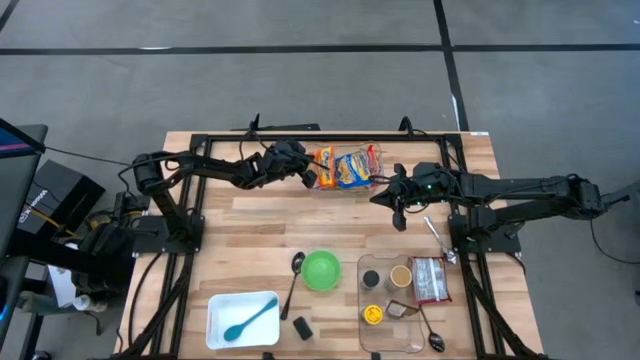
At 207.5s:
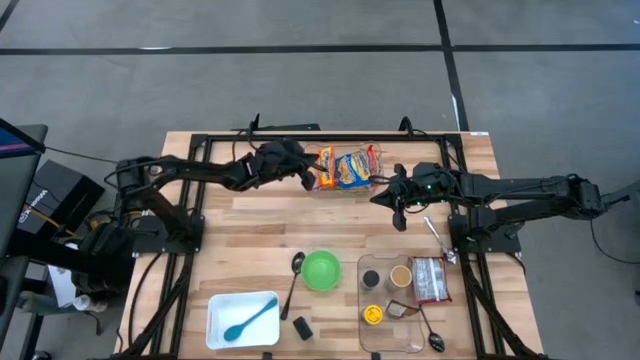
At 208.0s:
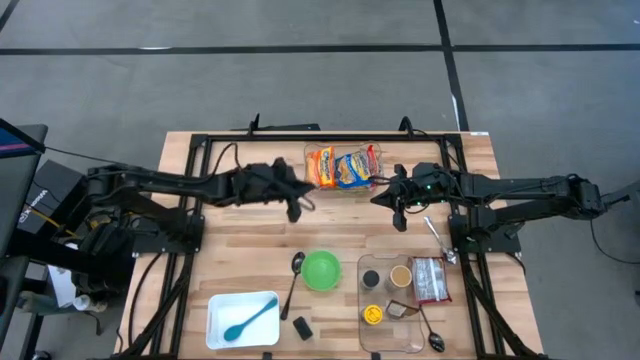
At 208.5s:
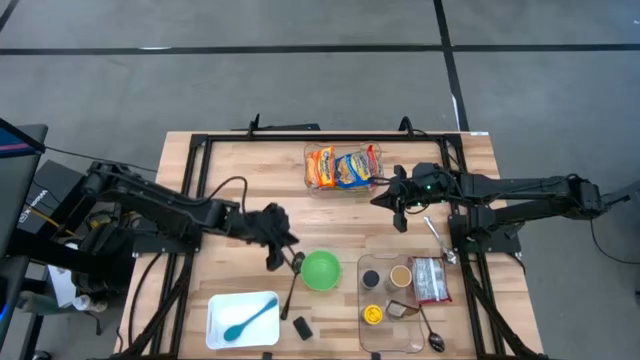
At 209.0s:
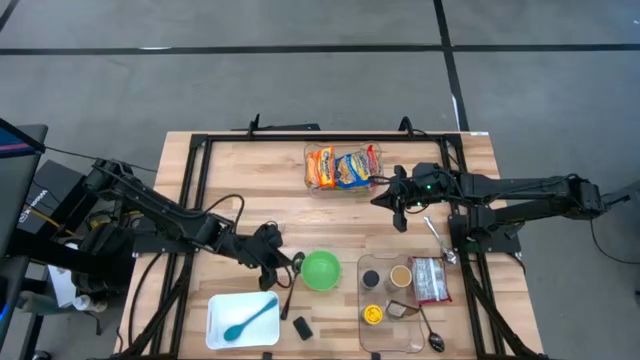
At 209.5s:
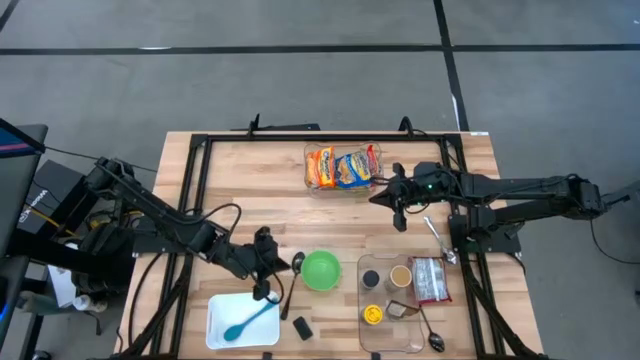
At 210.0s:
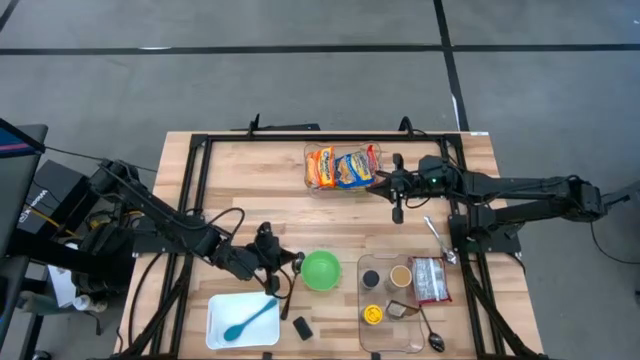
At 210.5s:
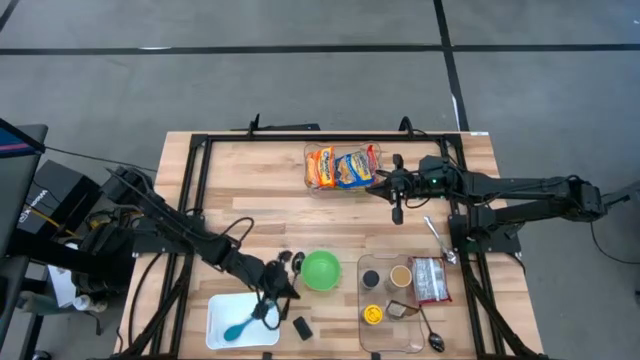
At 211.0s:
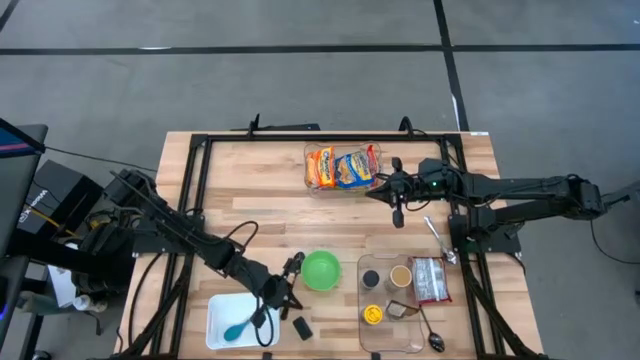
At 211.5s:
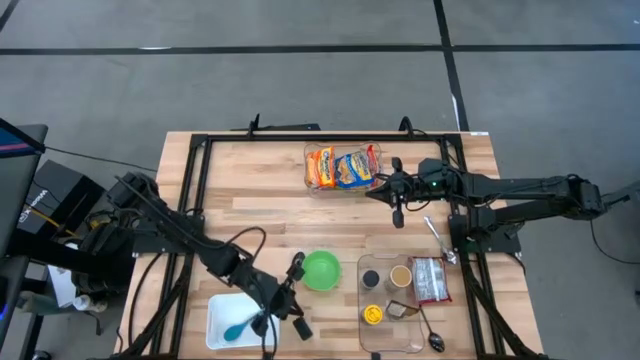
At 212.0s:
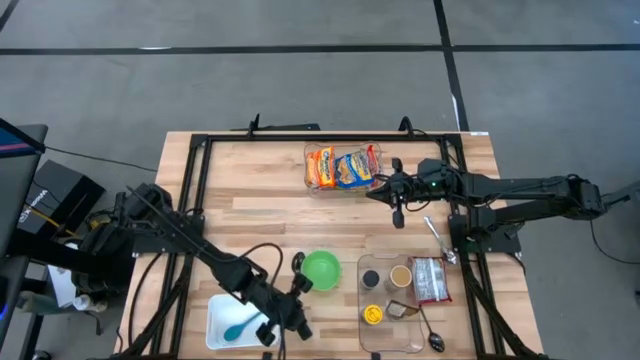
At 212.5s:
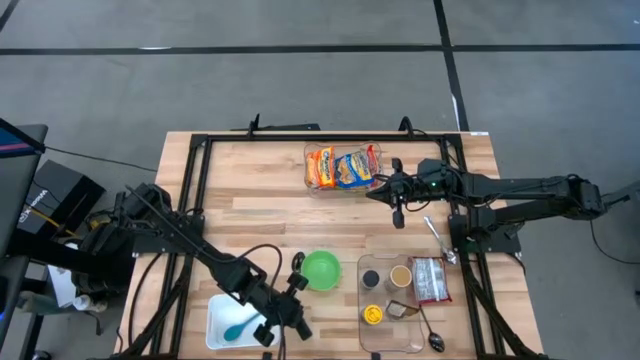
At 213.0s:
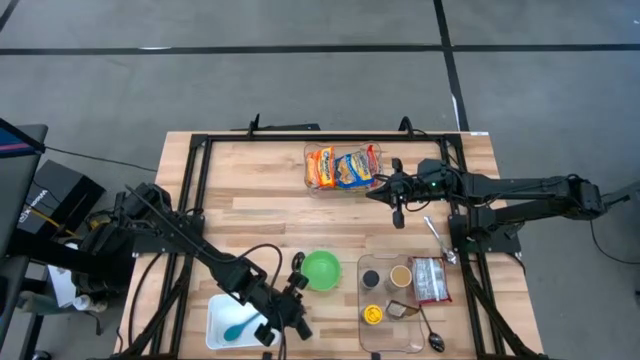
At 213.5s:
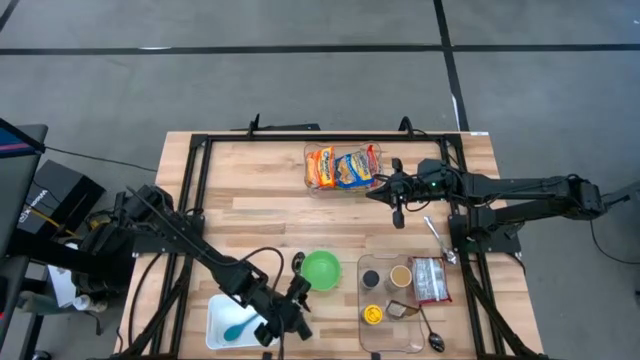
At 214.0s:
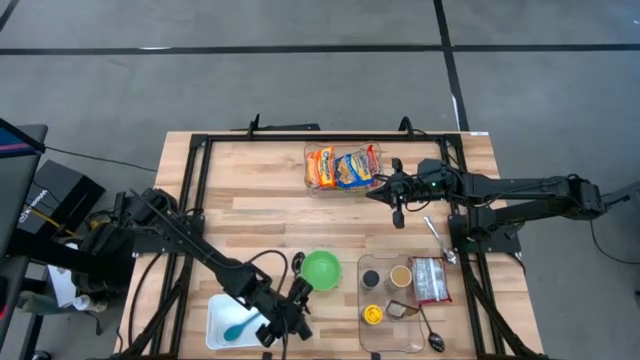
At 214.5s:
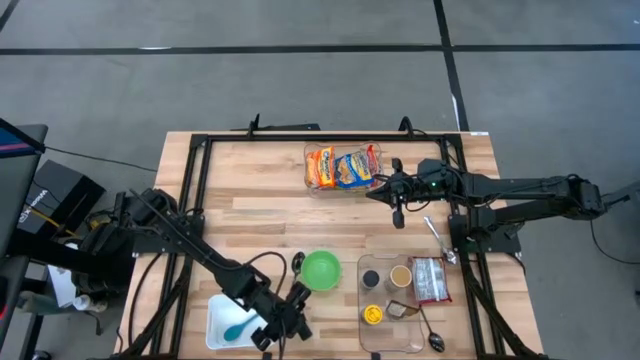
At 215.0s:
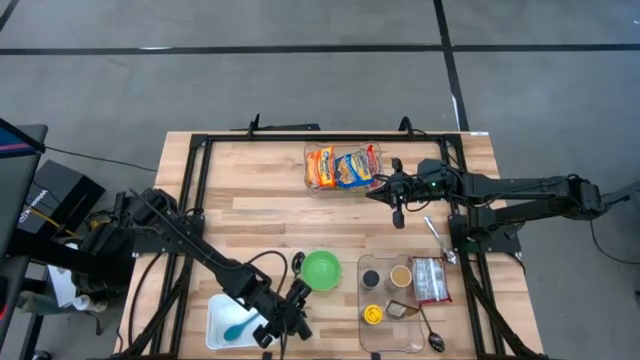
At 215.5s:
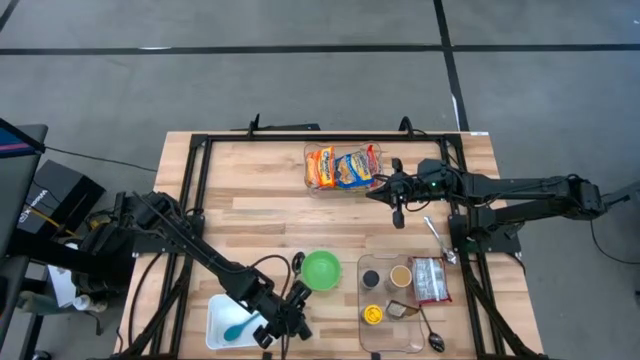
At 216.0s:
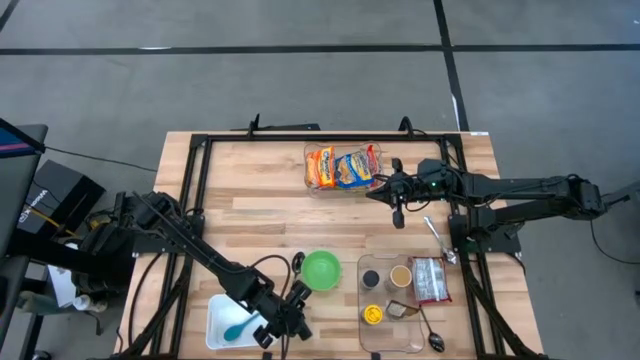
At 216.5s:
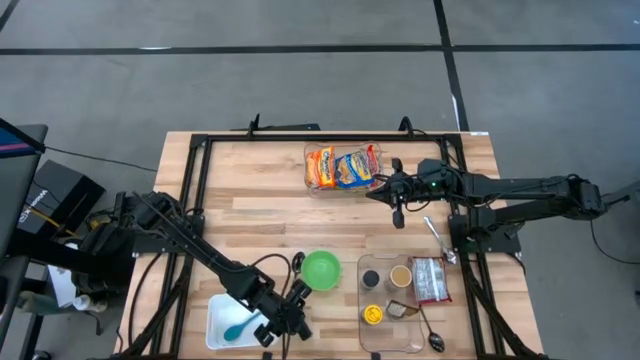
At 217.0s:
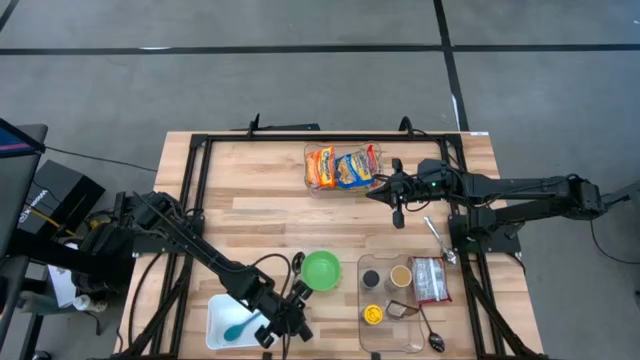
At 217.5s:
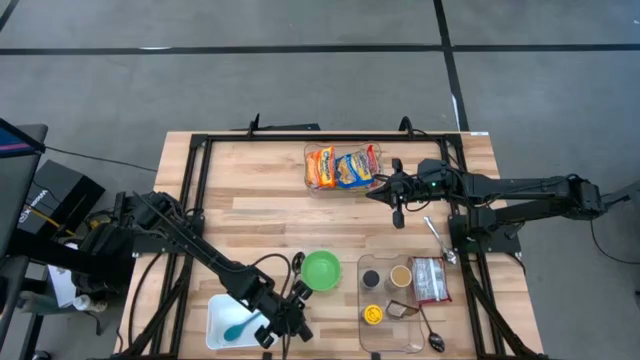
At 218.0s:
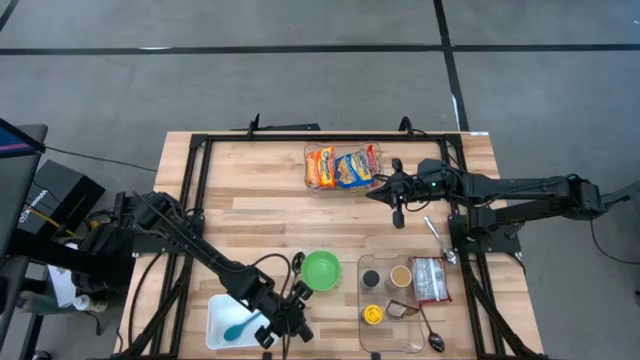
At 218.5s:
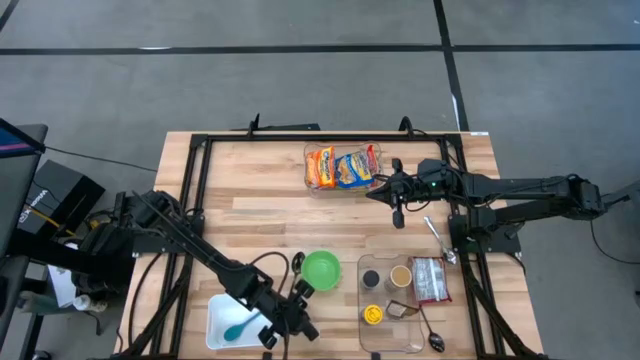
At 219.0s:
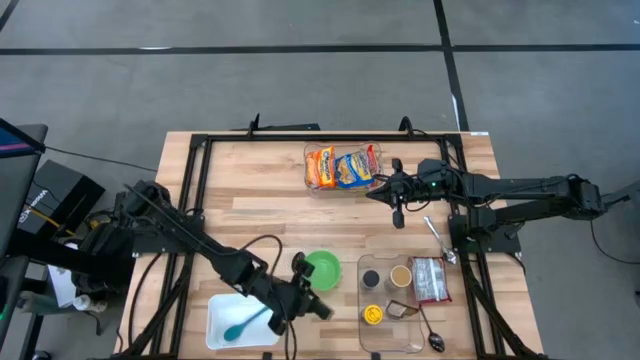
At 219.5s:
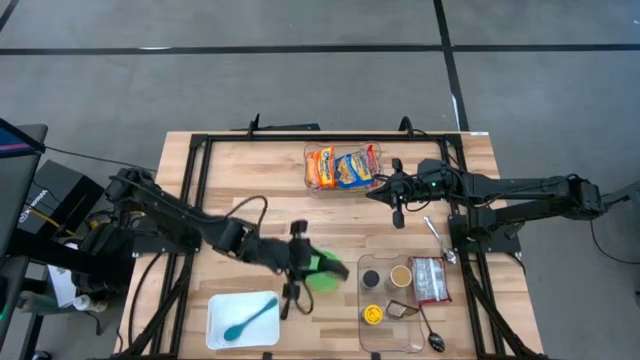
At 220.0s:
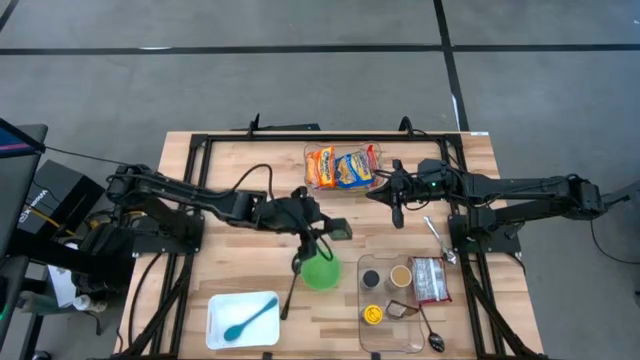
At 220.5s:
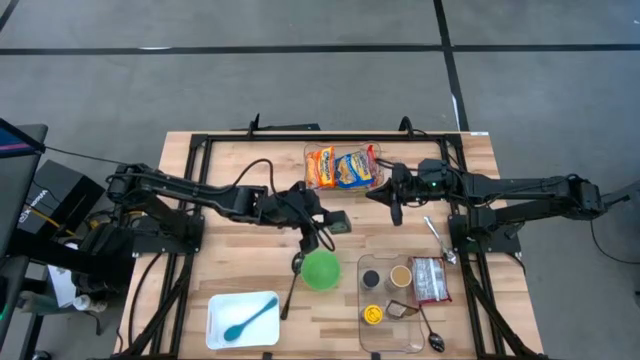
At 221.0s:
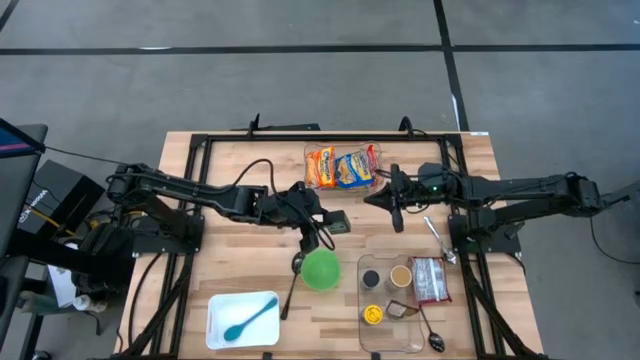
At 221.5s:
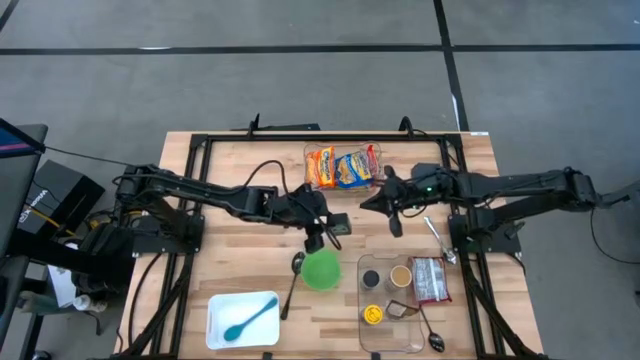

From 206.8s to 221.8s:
Task: Pick & Place Food Item
Put the red seasoning into the bottom transparent bin

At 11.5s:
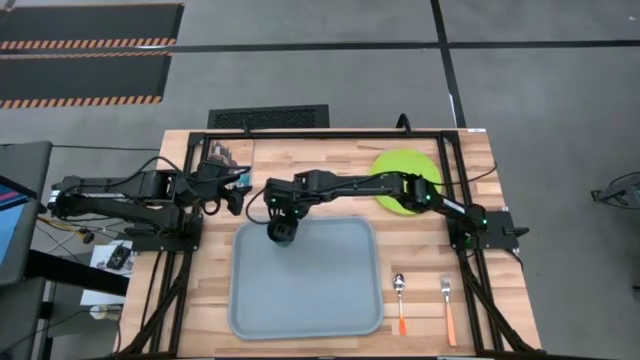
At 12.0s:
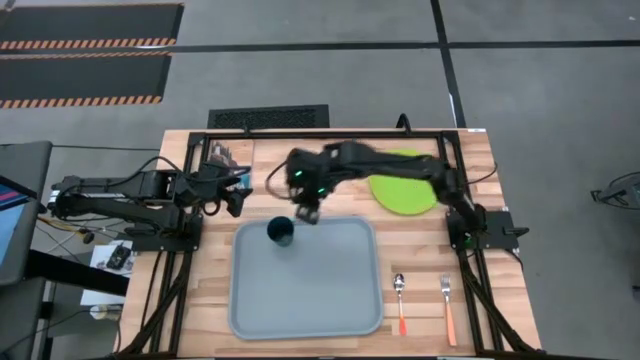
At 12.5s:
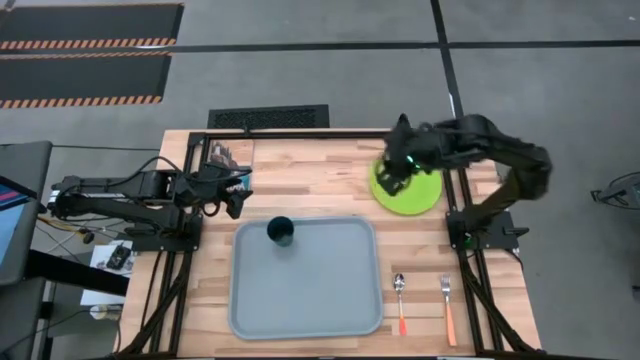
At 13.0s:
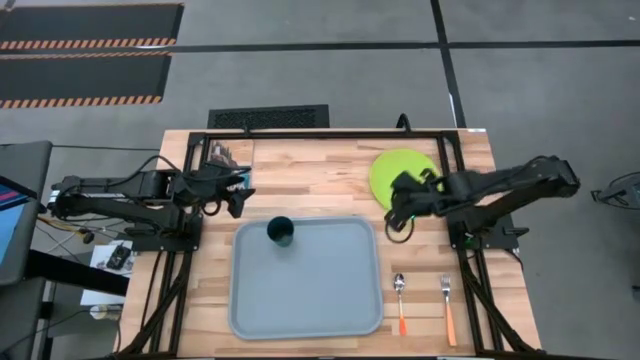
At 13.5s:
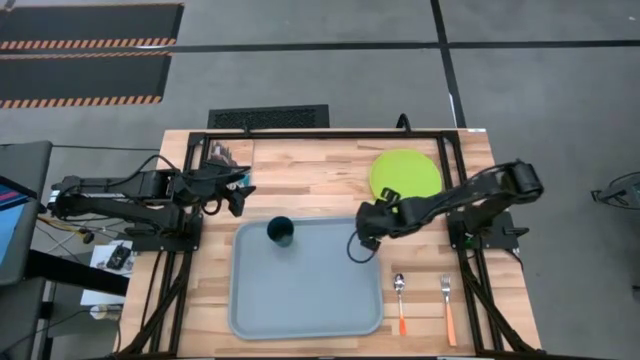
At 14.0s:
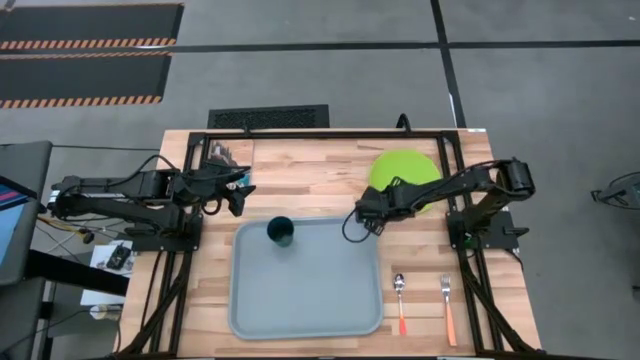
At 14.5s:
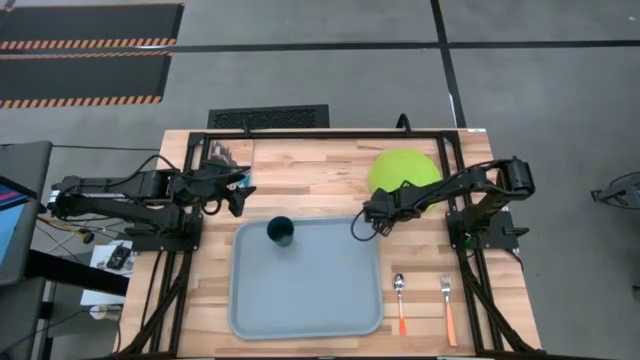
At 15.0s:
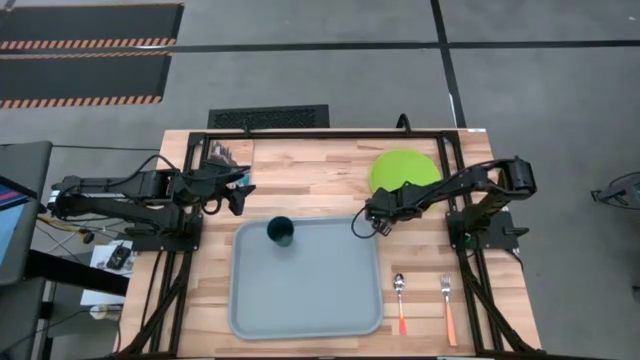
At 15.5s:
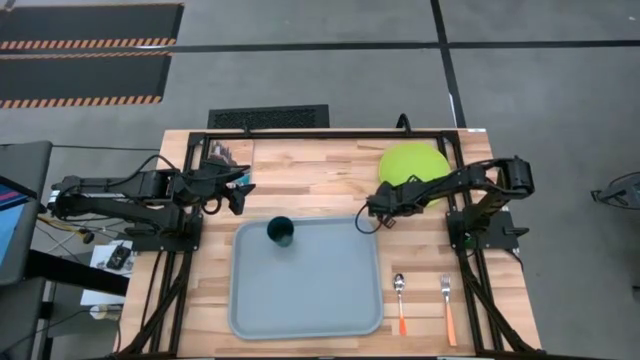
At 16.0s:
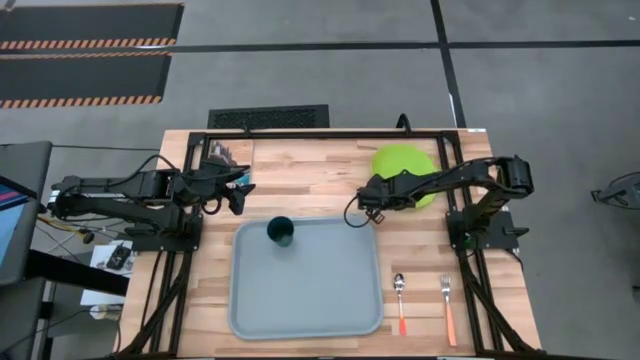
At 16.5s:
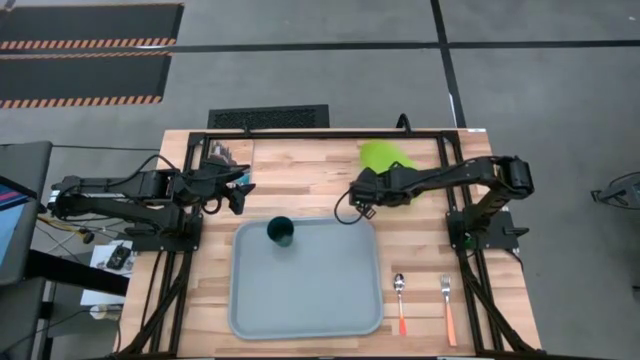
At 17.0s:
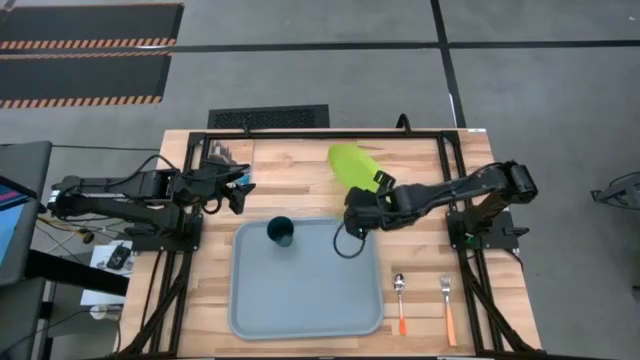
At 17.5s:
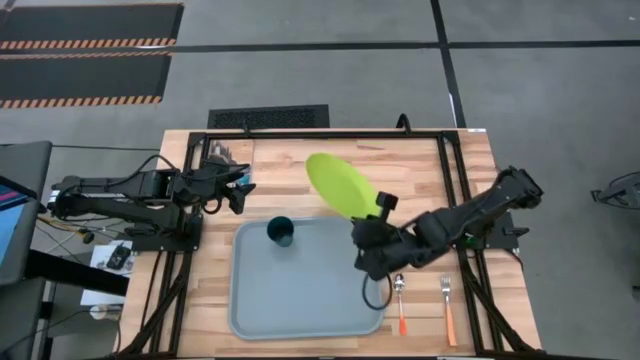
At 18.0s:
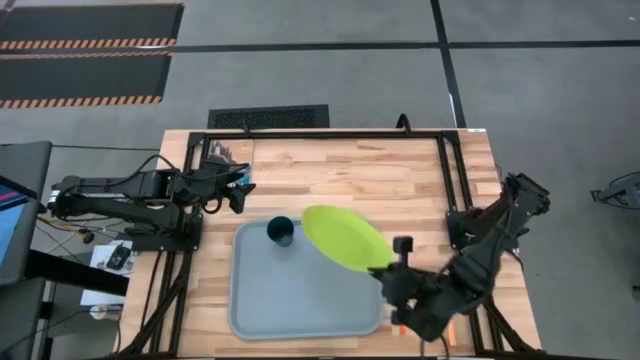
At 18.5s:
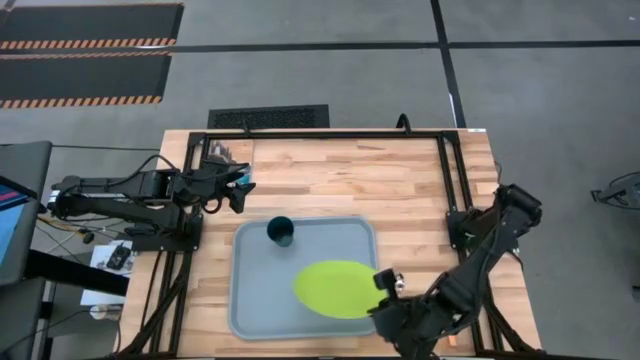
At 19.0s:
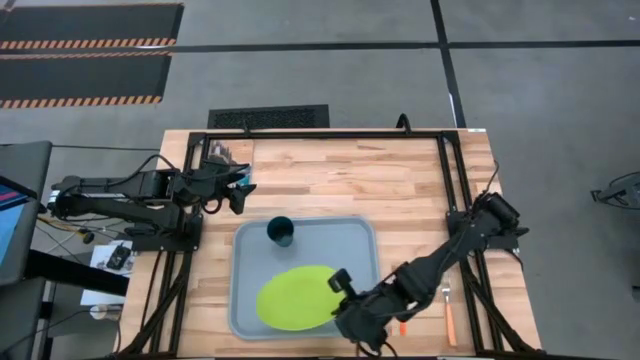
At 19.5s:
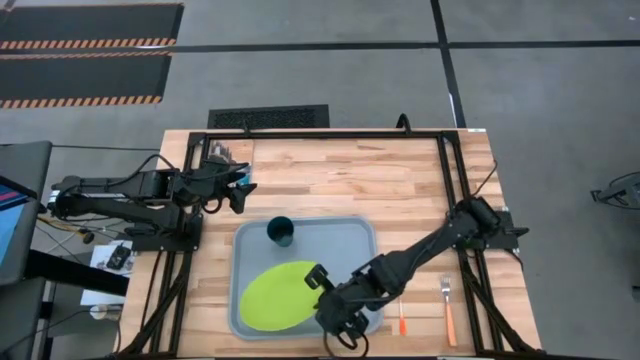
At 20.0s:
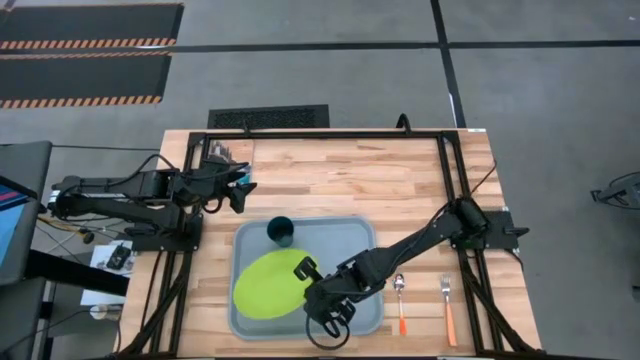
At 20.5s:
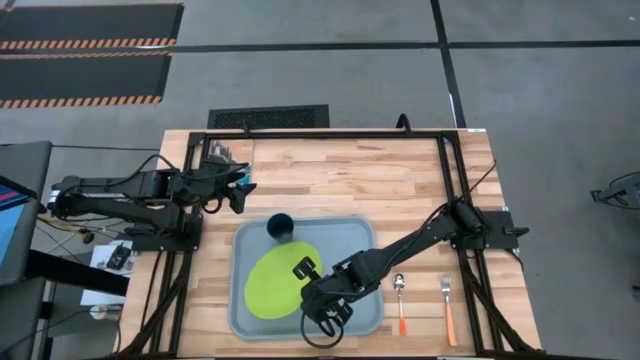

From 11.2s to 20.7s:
Task: Pick and place plate/cup/fork/spoon on tray
Put the light green plate on the gray serving tray
